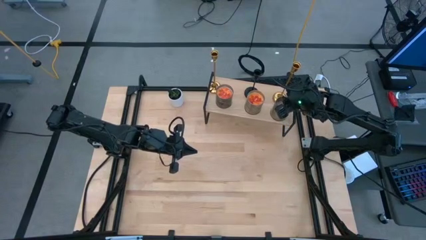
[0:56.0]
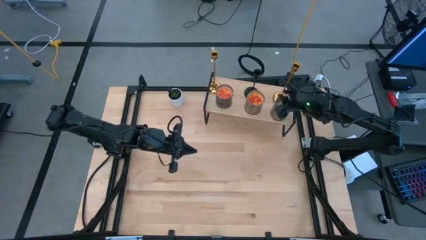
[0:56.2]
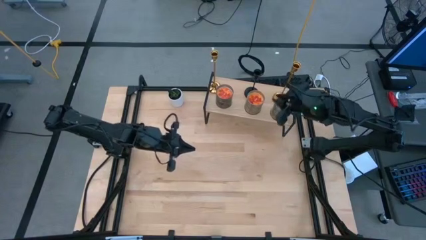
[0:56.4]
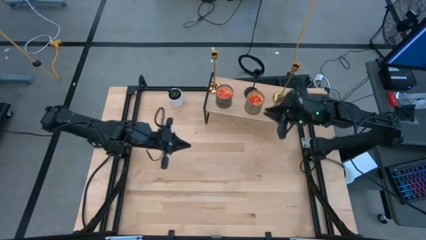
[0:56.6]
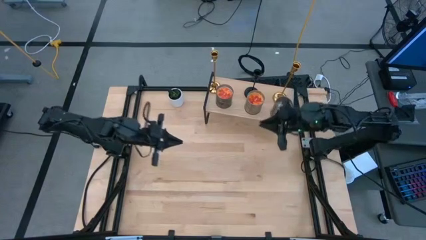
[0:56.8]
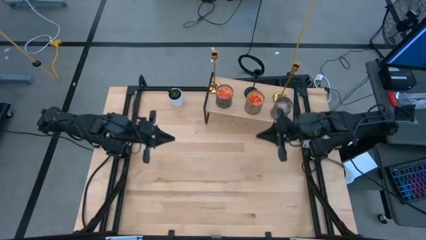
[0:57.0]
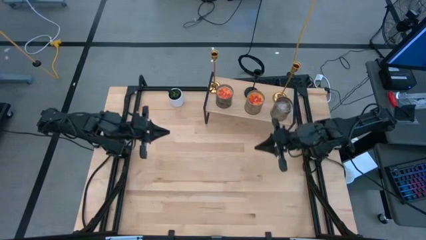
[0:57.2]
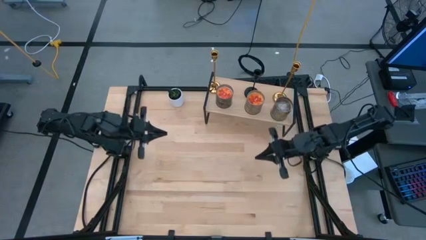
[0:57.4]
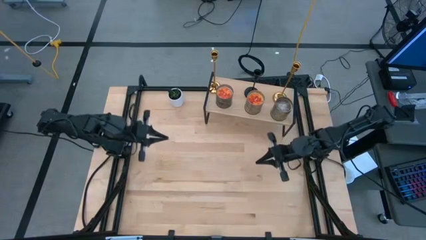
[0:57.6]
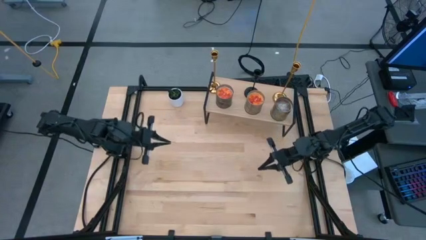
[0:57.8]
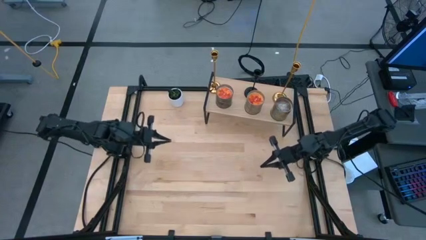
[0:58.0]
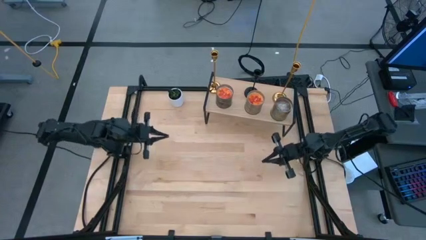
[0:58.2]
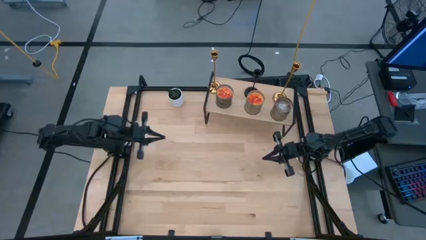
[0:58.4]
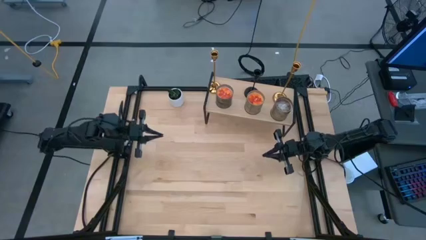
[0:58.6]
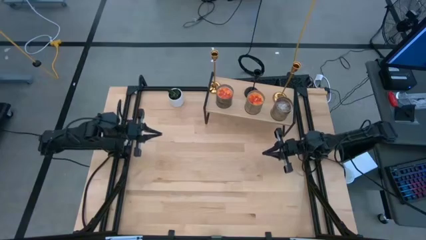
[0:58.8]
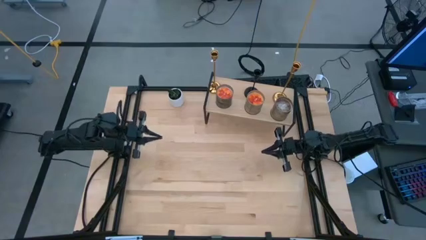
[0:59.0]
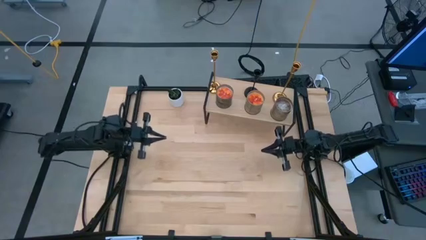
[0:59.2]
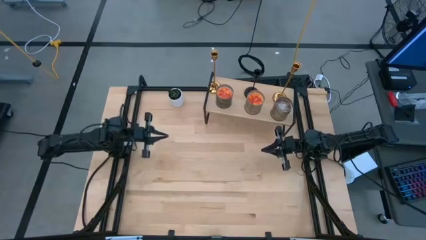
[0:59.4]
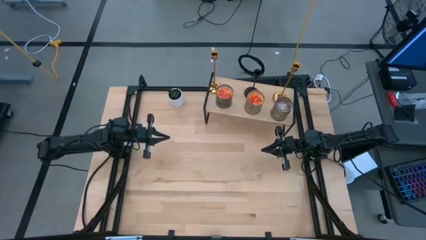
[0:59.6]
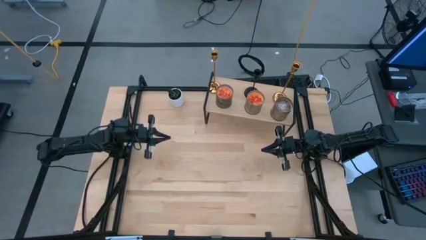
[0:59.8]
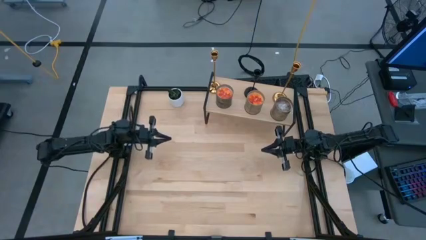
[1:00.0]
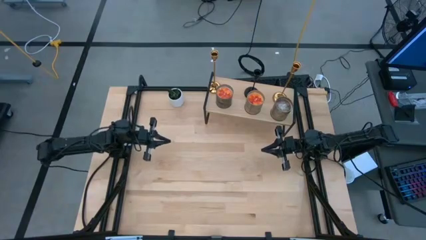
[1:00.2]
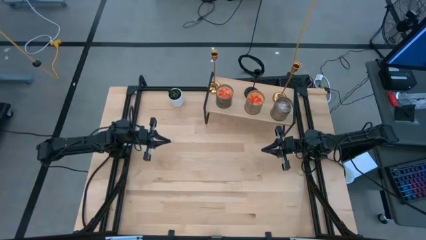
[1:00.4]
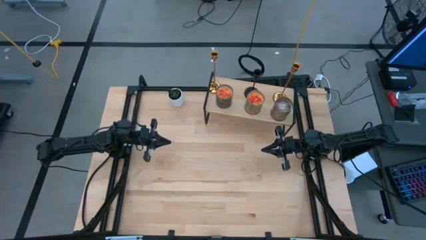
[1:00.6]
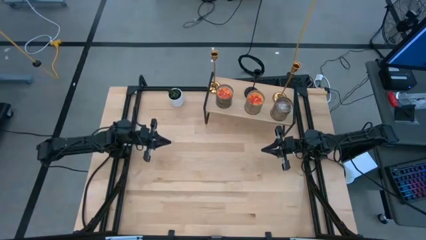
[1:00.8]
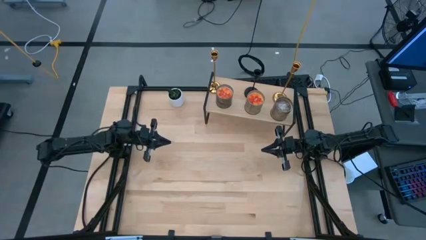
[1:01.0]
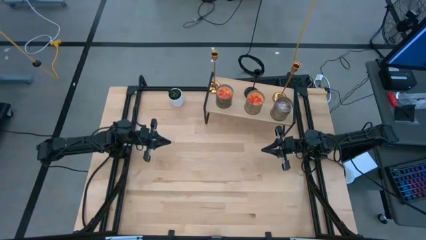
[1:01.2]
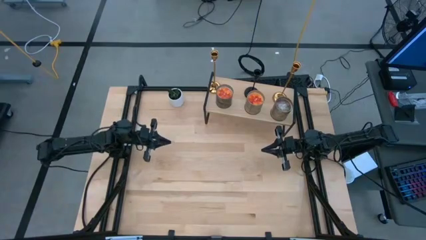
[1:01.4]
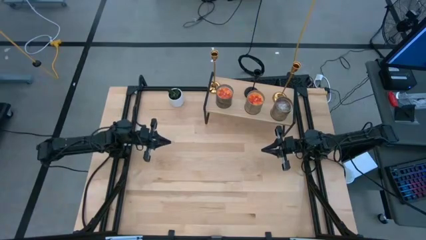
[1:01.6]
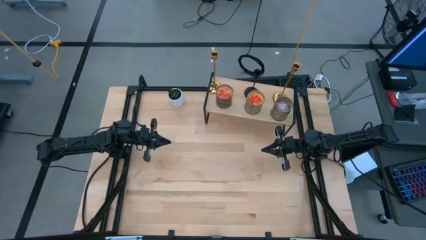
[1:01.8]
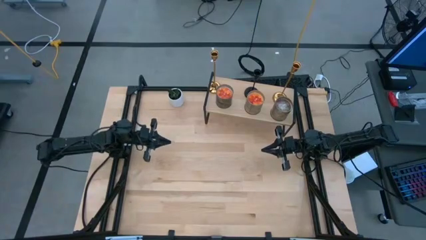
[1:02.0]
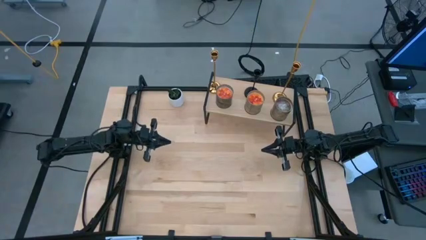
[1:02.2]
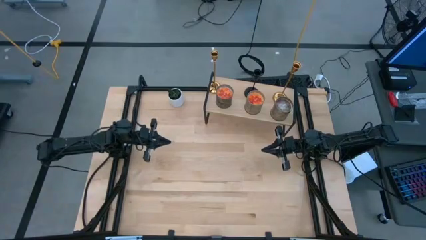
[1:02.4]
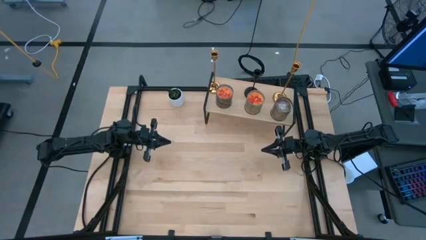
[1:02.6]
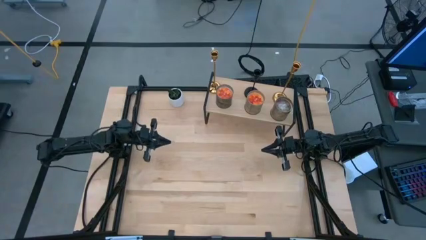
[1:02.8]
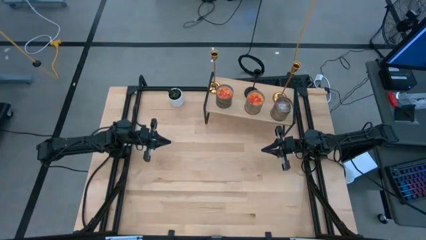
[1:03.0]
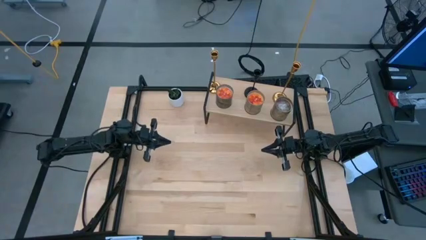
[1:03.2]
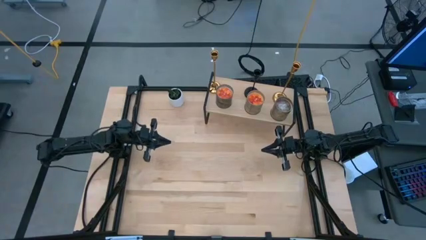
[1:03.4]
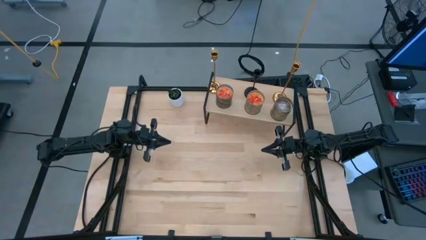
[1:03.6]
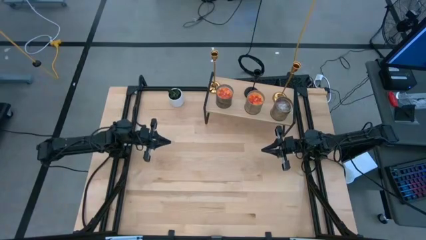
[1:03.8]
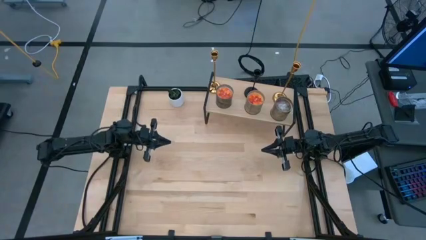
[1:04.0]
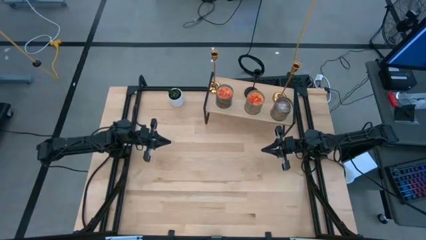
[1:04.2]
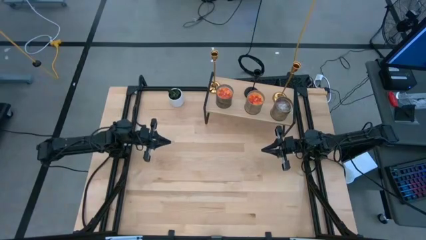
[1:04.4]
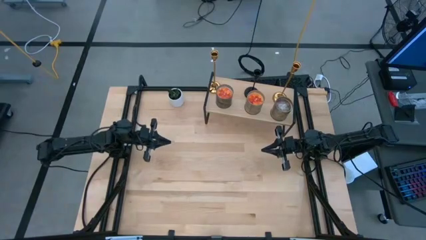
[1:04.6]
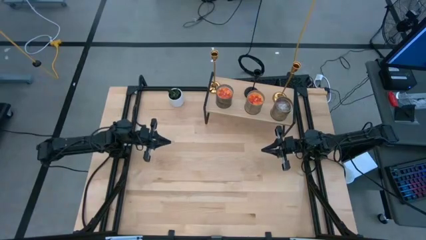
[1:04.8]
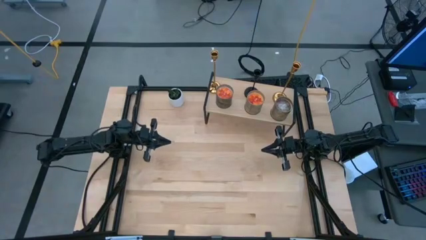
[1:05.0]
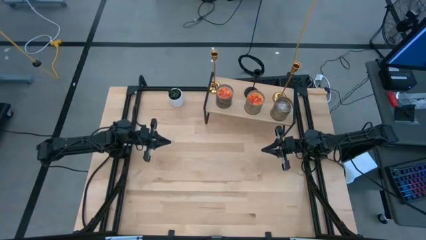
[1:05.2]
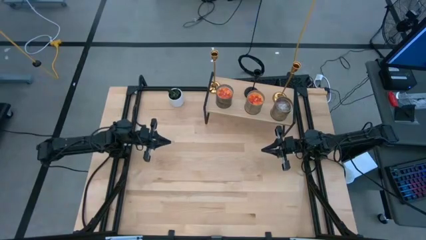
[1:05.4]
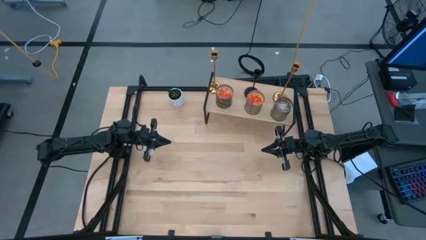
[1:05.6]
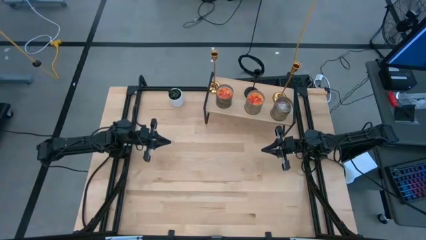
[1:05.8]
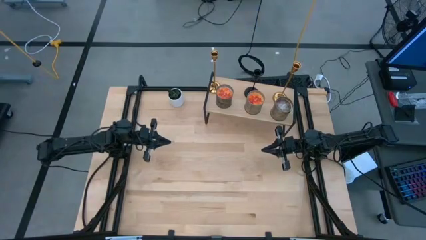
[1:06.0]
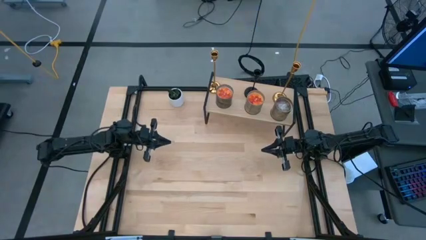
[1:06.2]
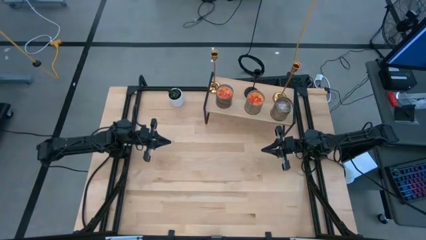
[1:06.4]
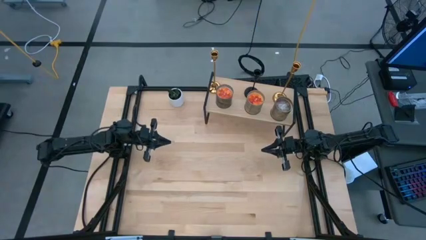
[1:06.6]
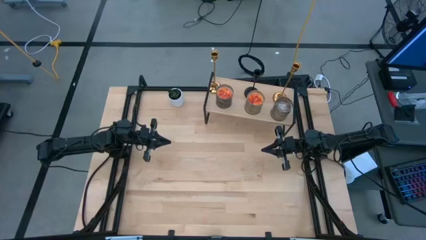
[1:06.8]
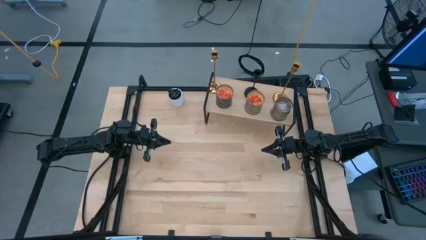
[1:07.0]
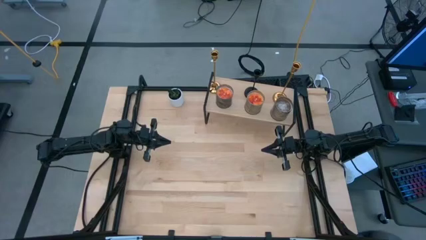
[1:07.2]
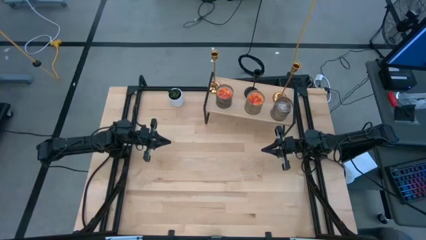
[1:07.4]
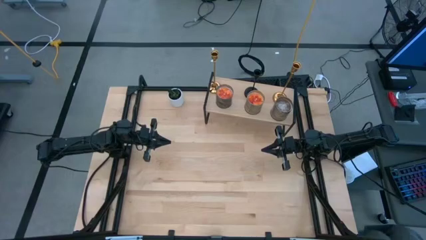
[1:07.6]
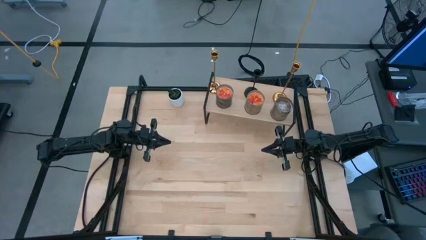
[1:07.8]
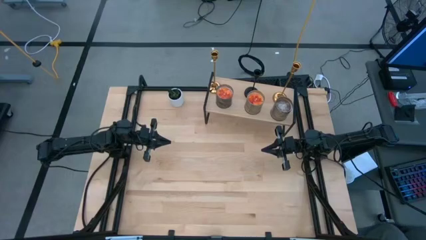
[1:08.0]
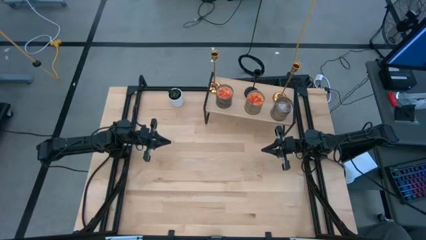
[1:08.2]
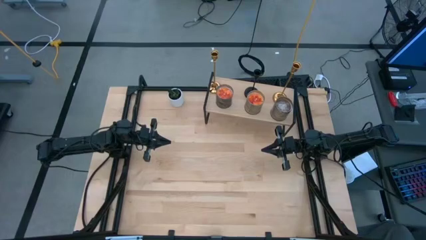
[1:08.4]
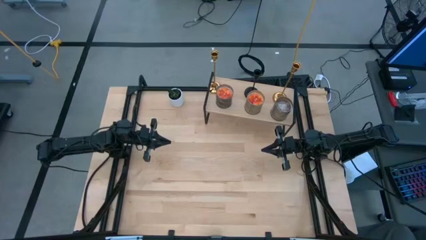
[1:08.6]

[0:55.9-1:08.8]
Task: Pick & Place candle stick holders
Return to Home Position

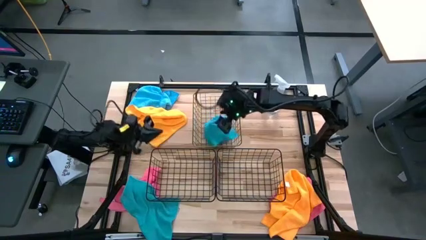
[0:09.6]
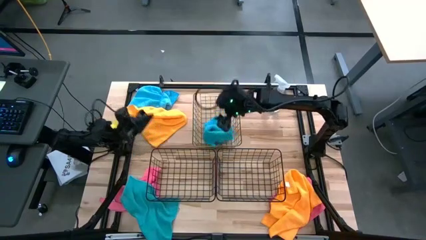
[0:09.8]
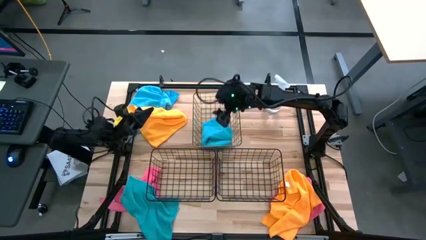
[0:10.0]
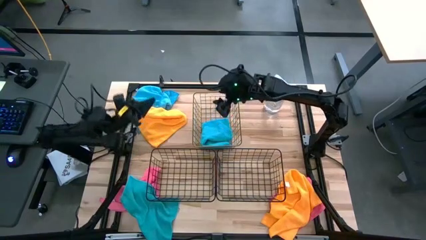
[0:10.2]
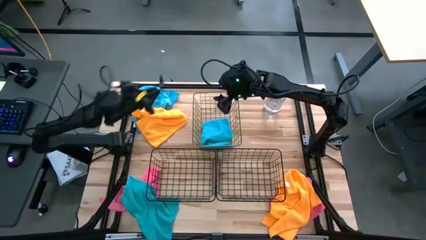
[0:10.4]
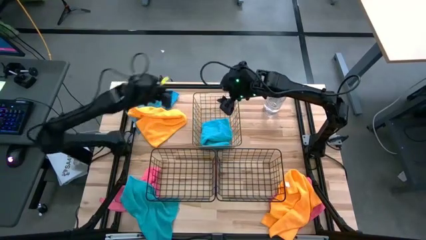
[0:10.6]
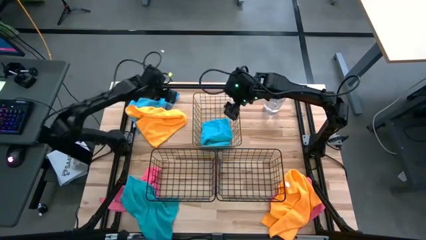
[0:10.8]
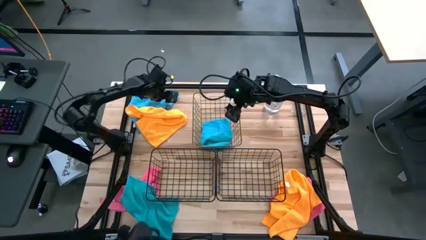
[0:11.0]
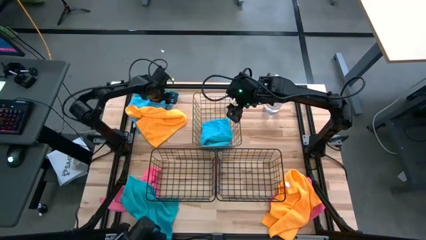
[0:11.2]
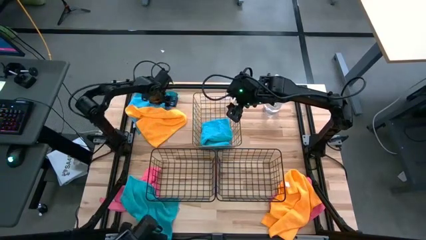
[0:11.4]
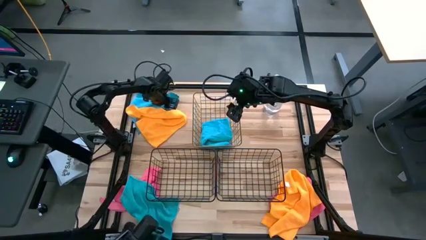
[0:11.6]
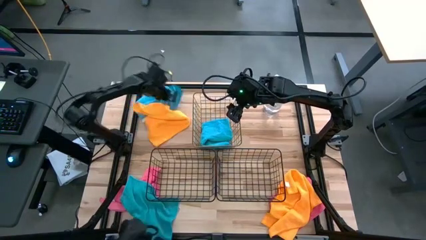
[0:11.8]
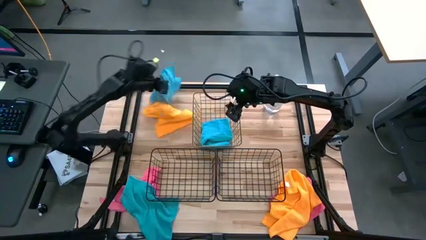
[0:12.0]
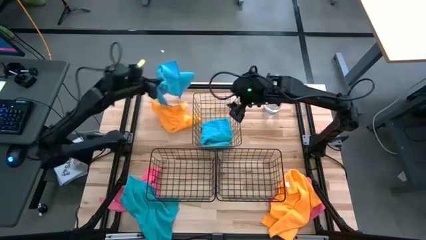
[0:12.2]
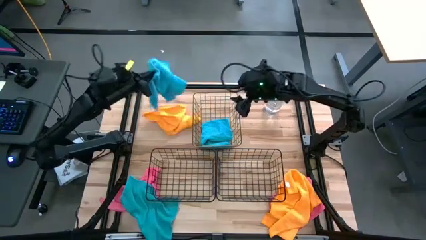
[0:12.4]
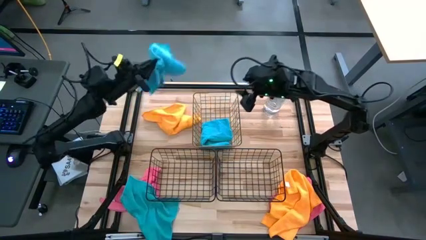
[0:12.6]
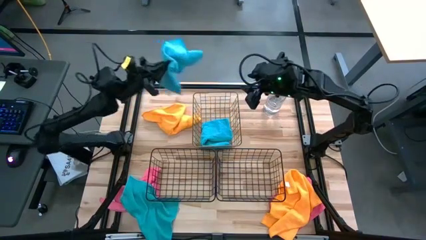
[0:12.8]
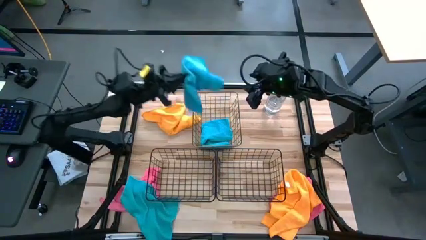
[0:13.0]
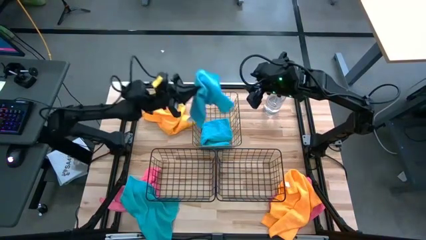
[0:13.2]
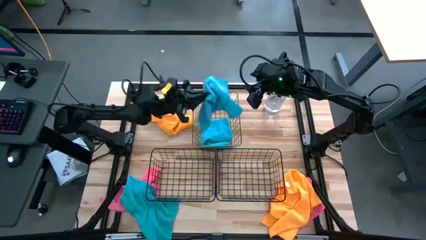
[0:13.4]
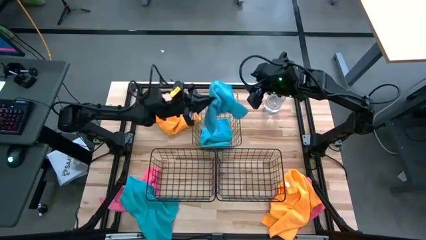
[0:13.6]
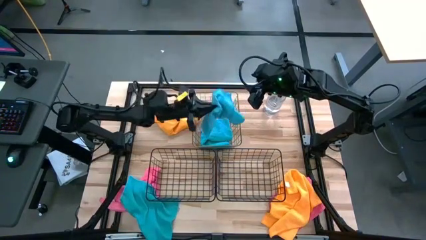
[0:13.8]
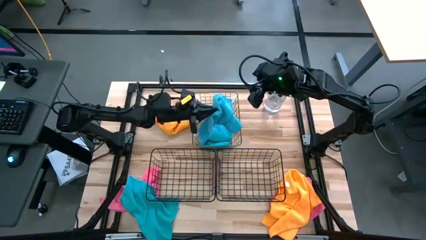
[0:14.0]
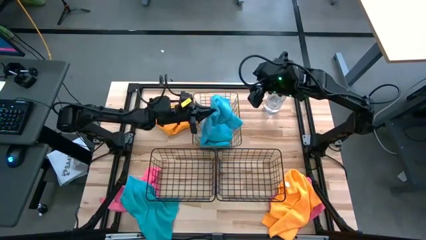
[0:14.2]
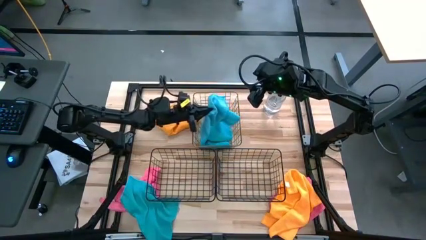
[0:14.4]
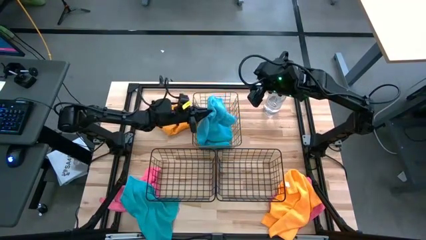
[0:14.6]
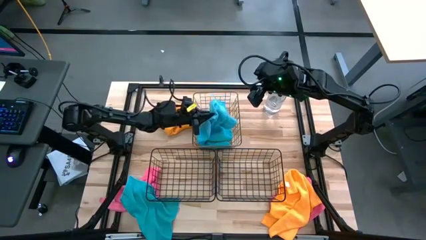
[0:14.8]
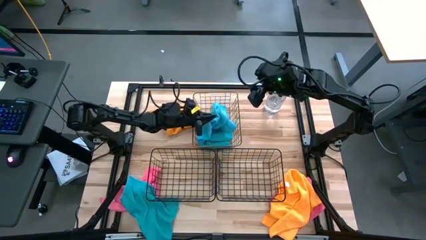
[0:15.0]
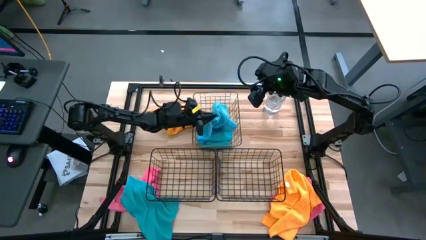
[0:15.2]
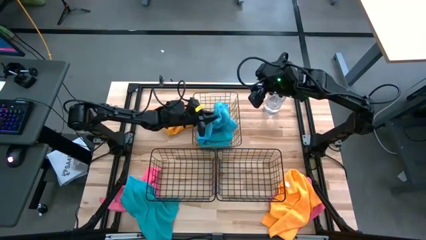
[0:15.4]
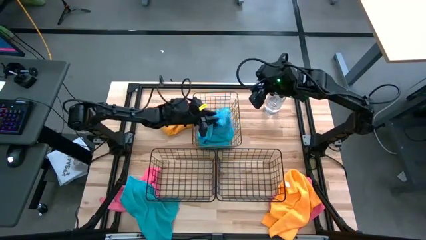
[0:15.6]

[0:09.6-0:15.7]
Task: Sort microfiber towel by color & place in baskets
Put the blue towel into the top center basket
